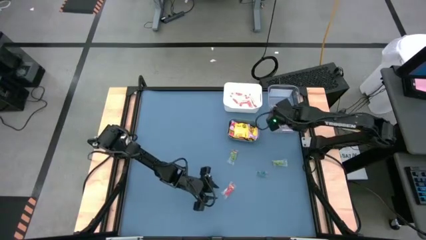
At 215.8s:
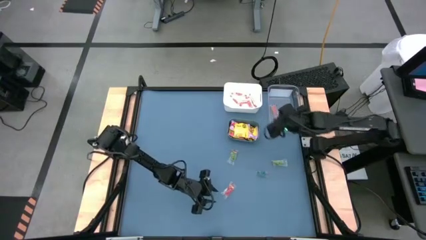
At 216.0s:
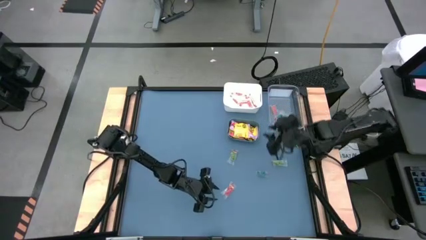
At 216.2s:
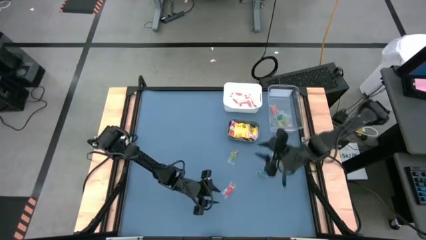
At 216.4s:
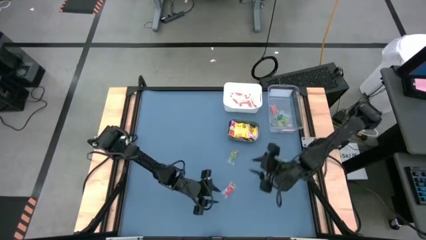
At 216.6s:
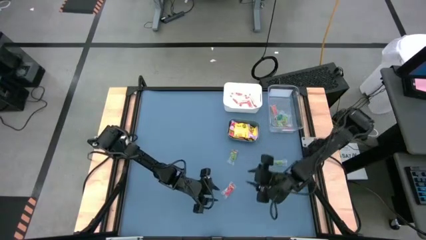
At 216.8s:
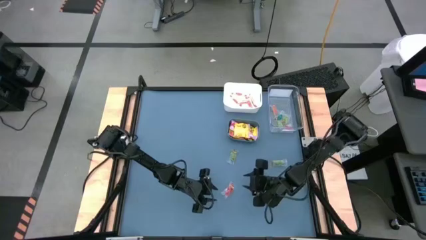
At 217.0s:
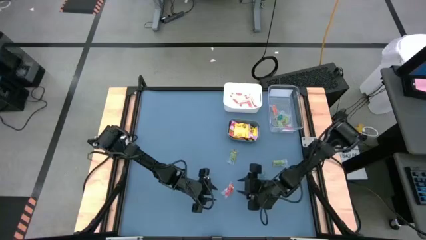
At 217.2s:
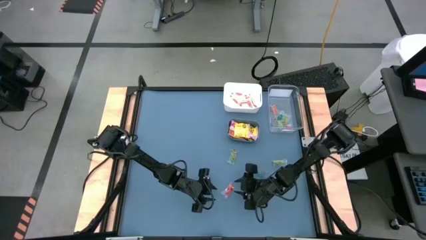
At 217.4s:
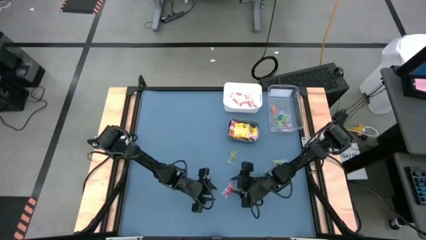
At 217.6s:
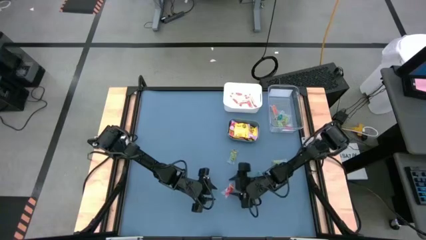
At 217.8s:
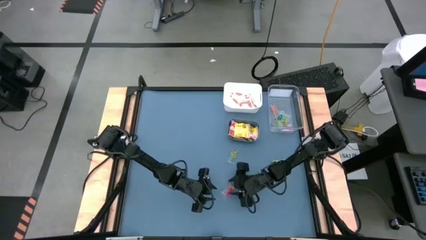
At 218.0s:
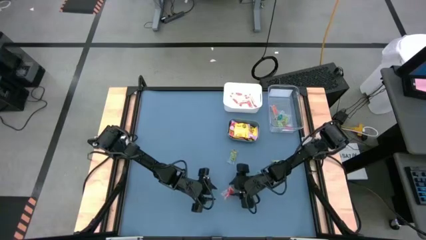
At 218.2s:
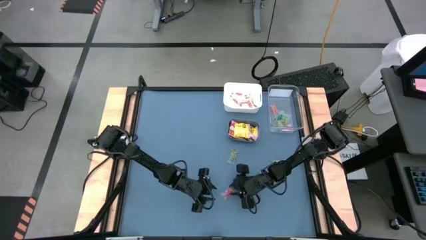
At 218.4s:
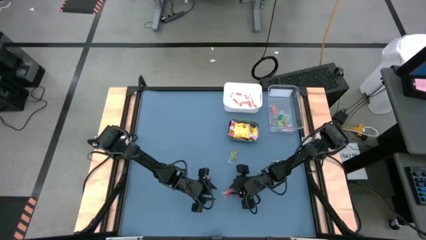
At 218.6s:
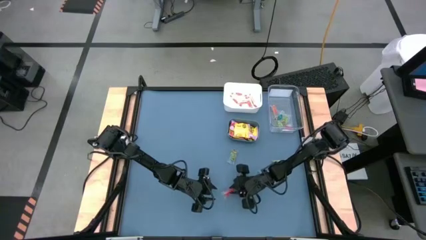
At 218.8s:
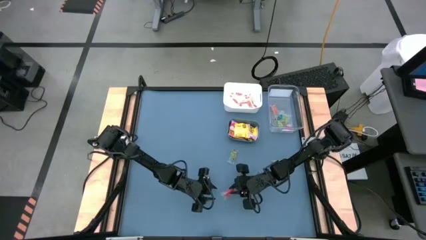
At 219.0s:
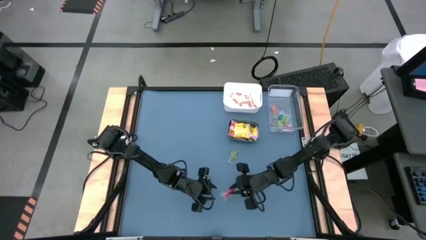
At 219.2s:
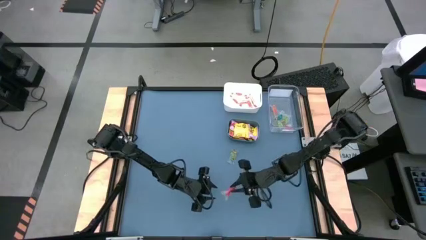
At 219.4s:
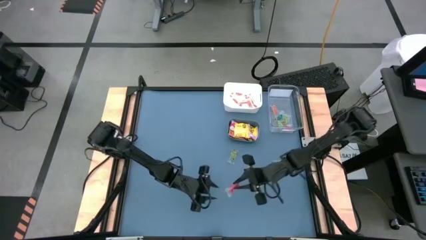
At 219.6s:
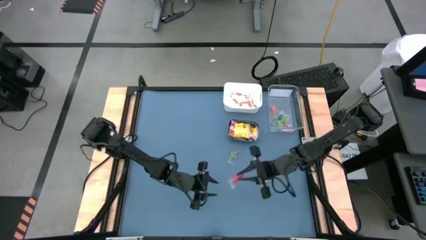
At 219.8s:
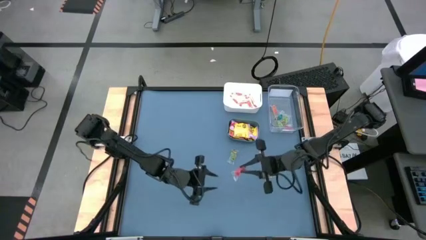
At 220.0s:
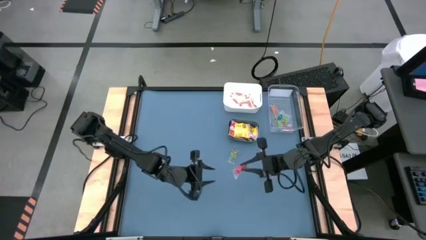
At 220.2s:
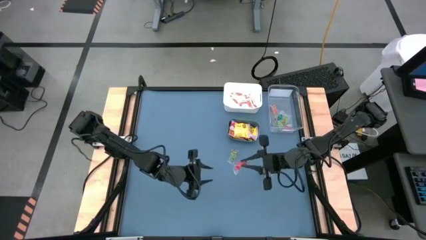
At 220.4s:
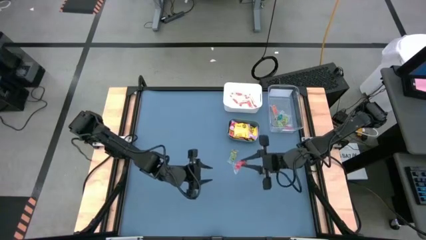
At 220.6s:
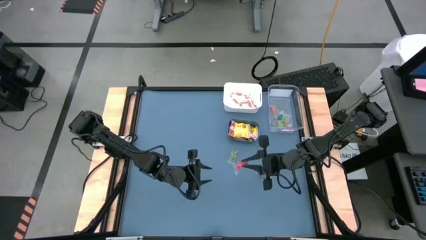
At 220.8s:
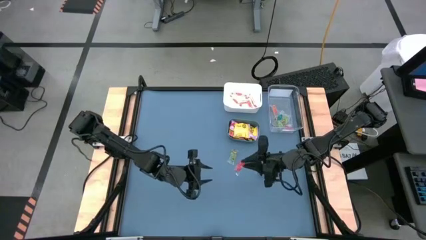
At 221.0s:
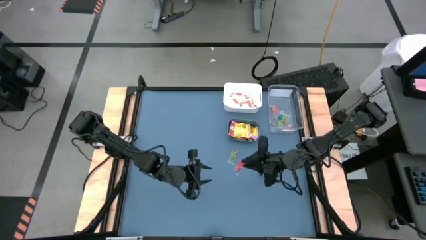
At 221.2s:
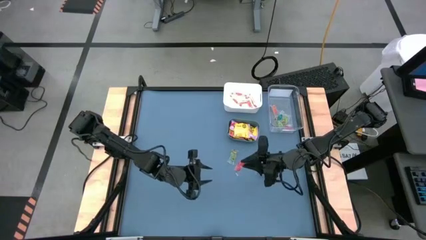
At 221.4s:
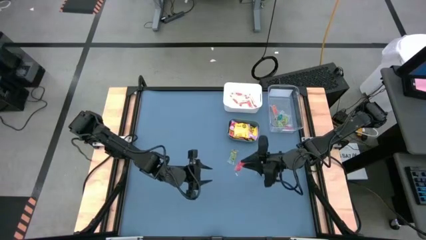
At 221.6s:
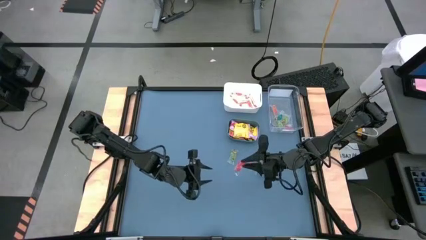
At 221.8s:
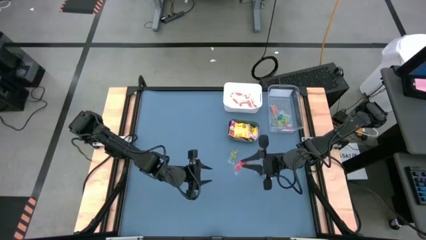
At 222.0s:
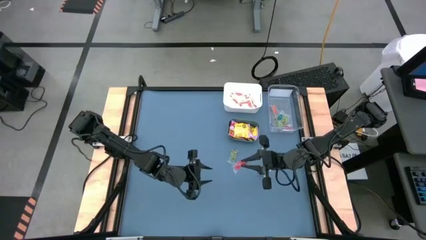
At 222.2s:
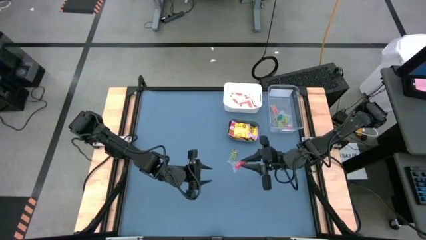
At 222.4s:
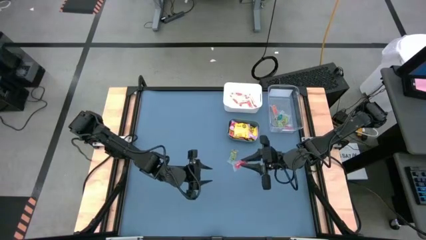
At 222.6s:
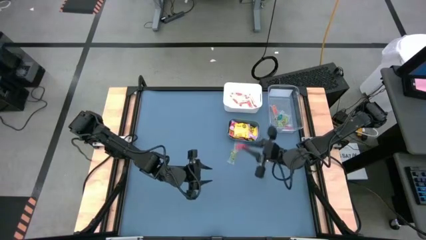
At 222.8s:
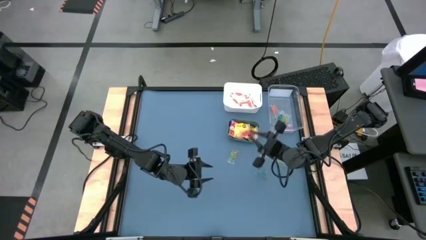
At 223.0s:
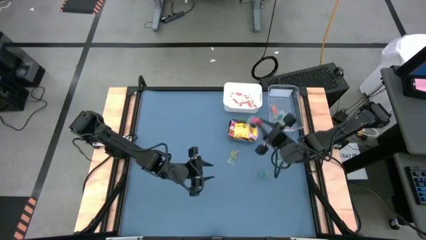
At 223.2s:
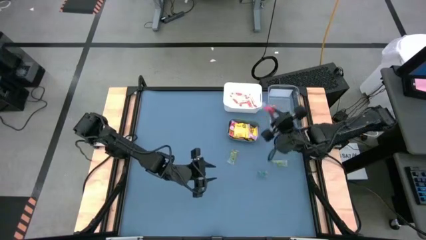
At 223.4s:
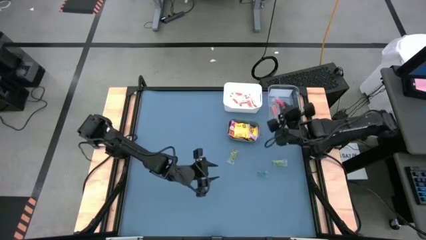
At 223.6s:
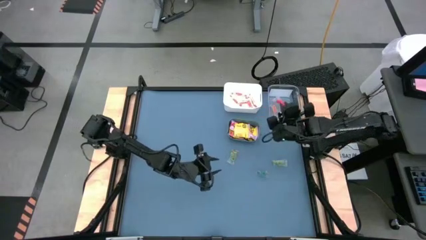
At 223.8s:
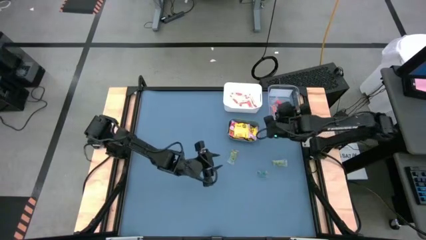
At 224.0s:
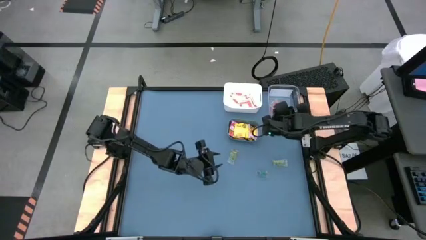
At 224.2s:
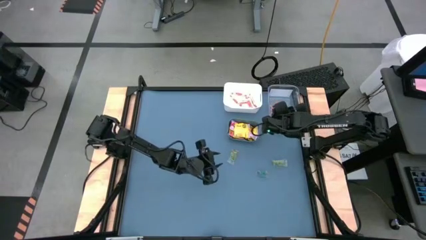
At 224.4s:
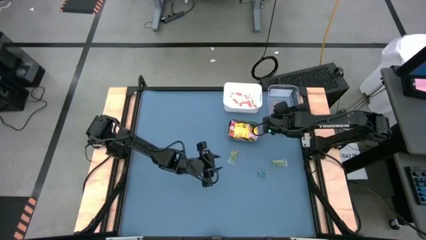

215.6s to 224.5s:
Task: Sort candy
Put the bottom left red candy into the transparent bin

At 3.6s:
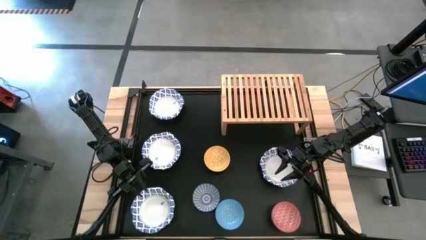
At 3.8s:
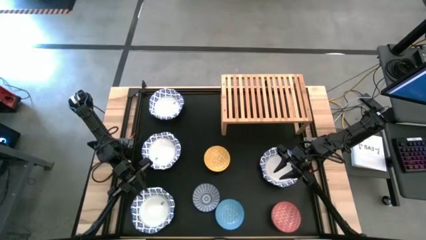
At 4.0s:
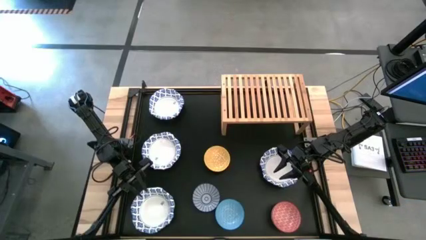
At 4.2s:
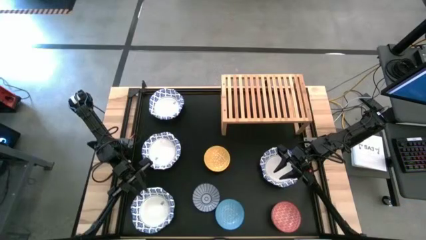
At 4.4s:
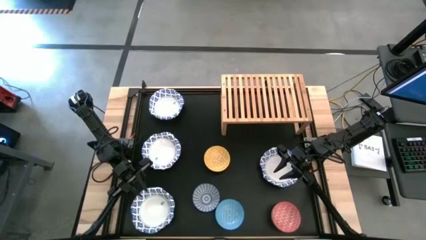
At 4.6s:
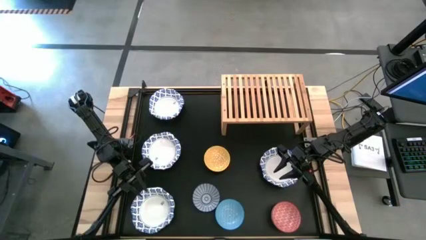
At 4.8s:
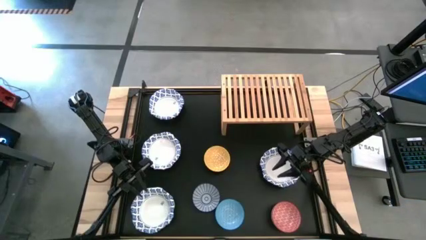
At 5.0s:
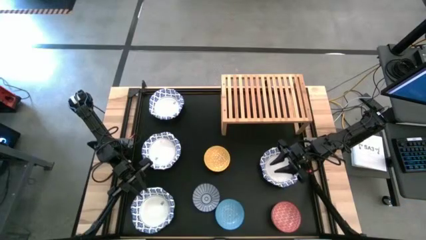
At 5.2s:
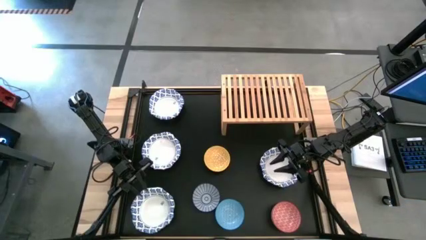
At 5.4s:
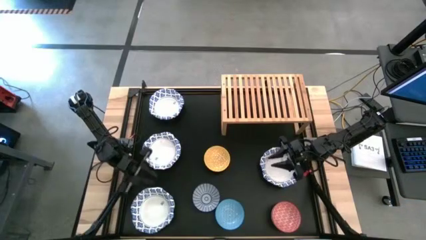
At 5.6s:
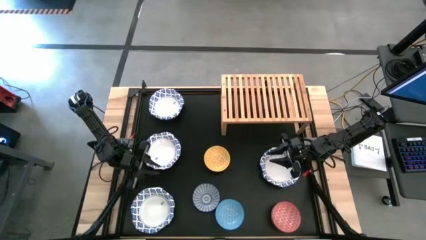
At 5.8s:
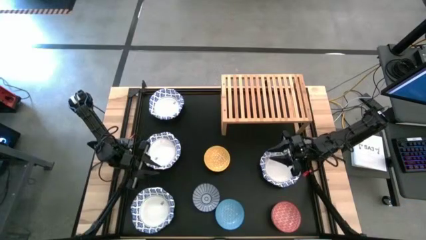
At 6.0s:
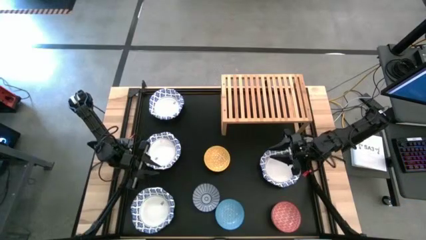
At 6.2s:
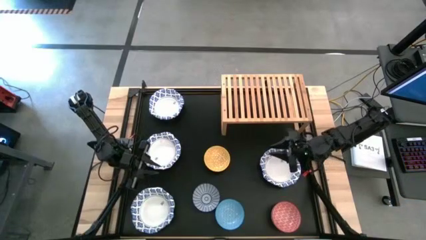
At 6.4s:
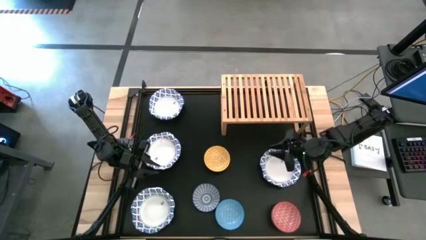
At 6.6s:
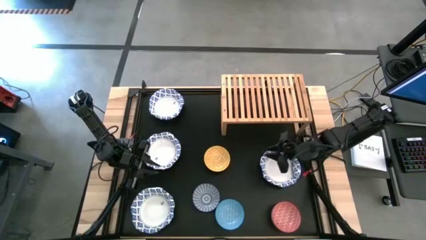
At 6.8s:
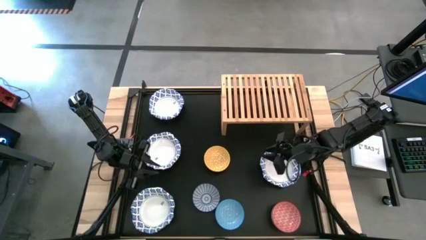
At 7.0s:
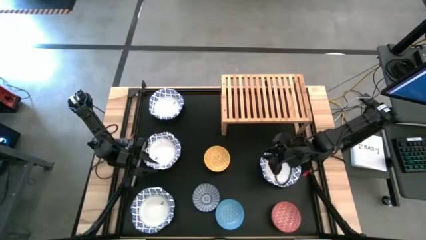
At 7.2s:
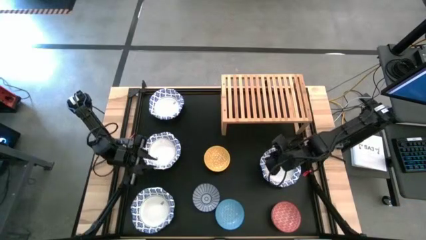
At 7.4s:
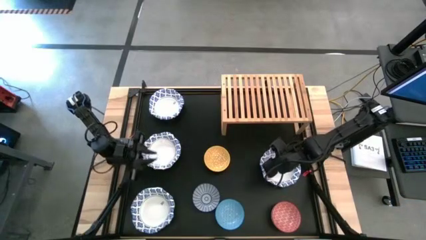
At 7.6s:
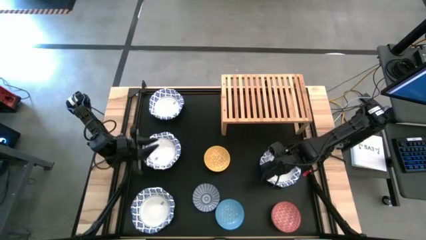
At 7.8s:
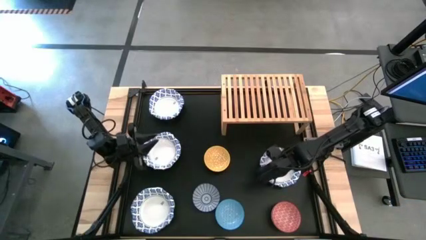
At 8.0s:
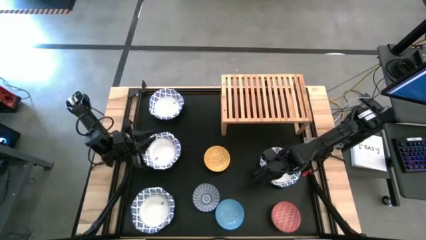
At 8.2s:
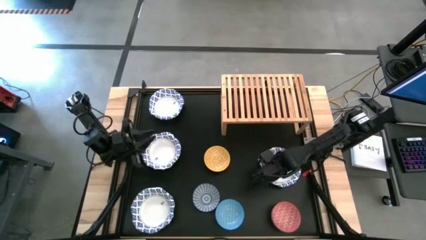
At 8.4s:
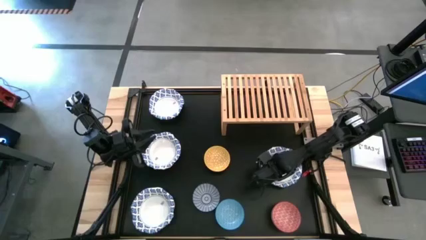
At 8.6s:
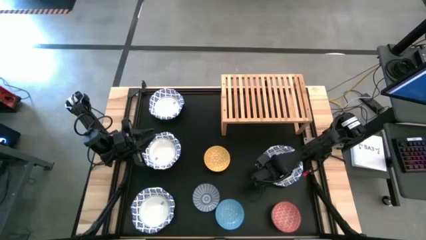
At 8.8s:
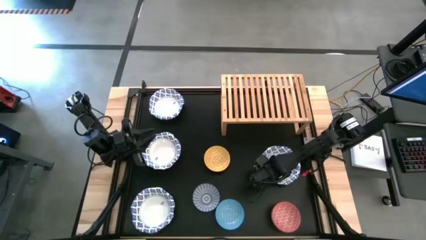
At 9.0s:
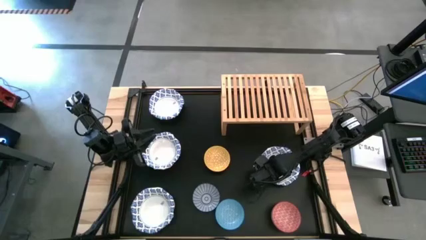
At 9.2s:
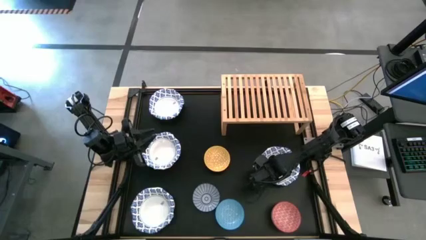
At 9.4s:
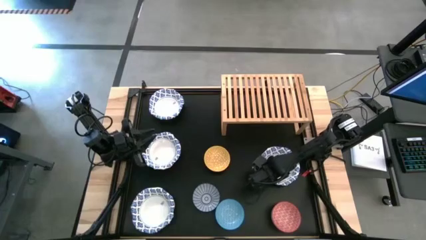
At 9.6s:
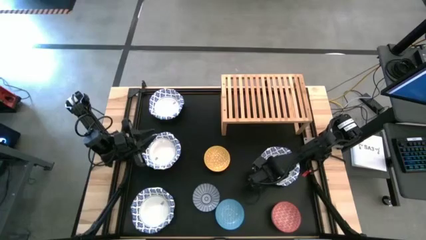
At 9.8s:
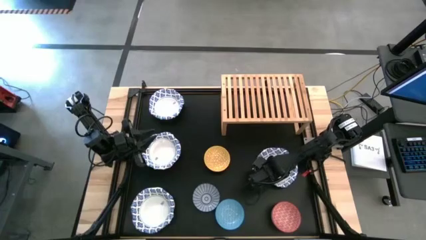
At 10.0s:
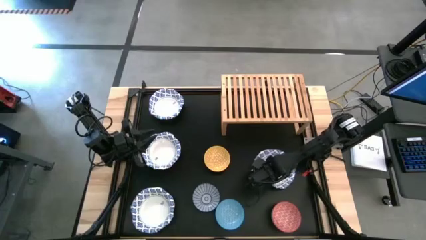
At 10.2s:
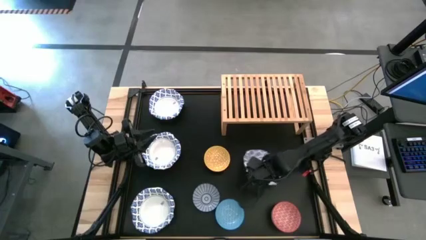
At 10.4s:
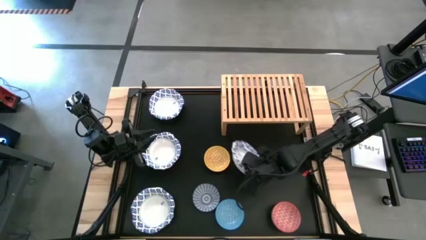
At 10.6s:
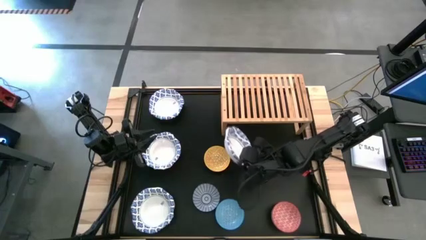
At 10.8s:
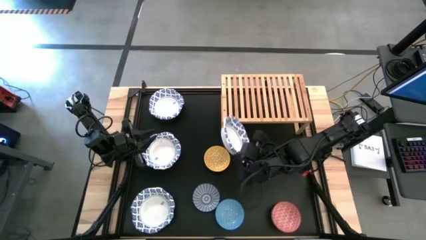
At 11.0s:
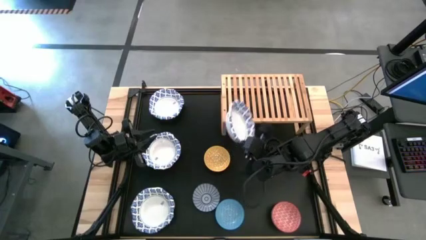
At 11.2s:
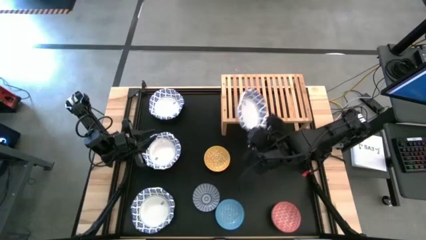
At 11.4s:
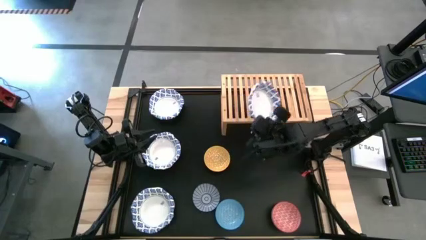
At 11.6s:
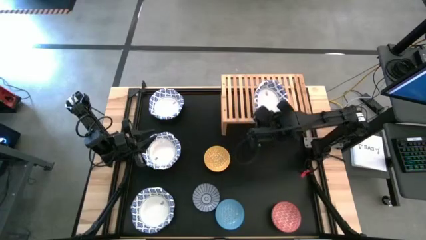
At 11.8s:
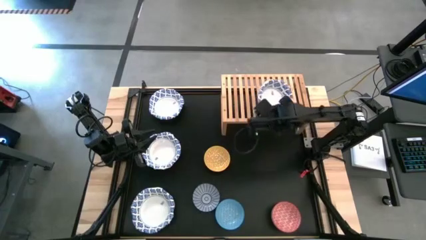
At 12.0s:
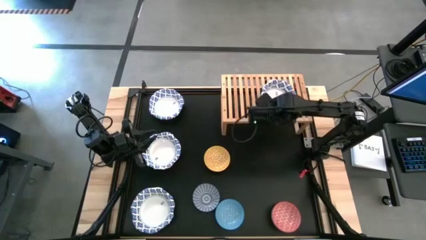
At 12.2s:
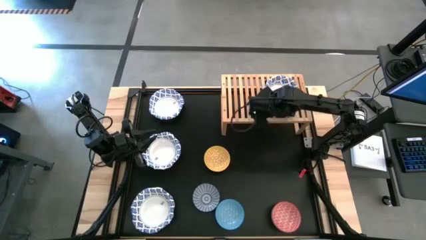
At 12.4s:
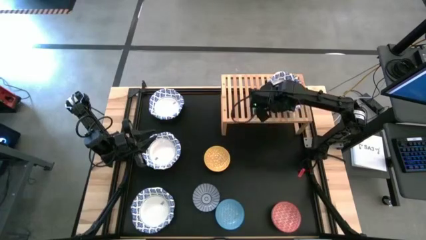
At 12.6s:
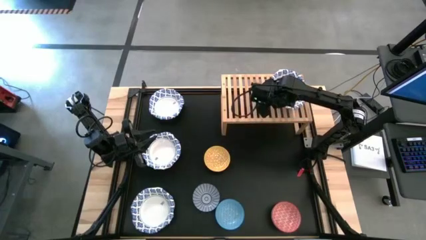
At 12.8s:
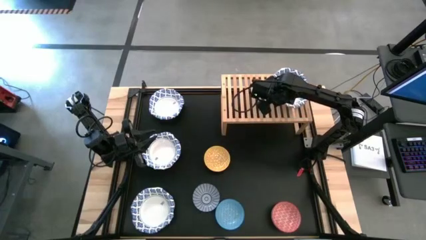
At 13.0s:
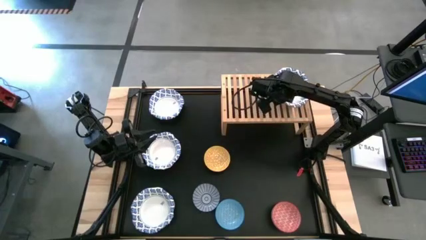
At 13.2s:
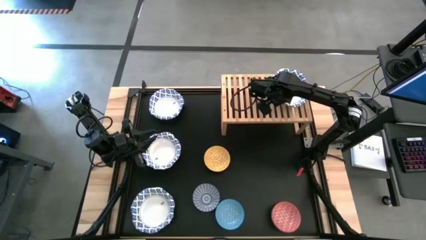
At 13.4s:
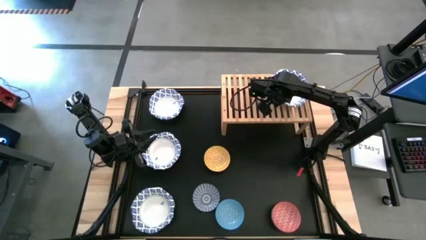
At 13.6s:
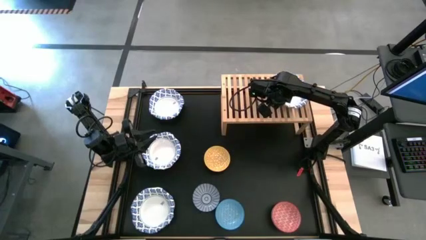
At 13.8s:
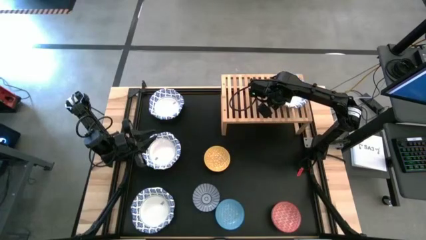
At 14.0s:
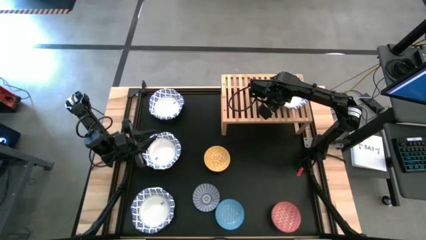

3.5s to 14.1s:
Task: Place and stack bowls onto a shelf
Put the right white bowl on the shelf
